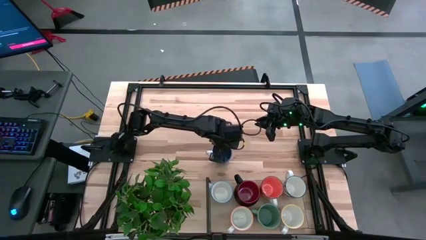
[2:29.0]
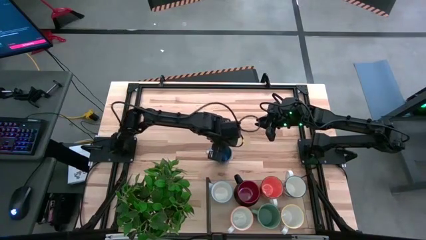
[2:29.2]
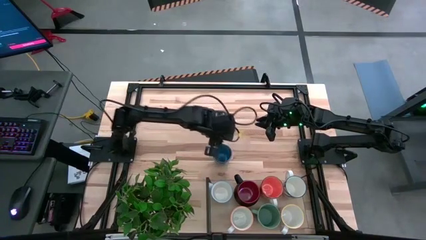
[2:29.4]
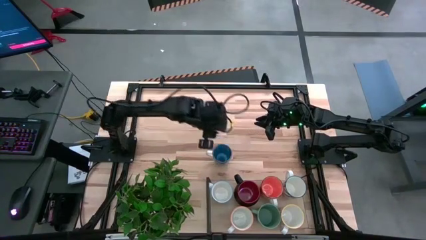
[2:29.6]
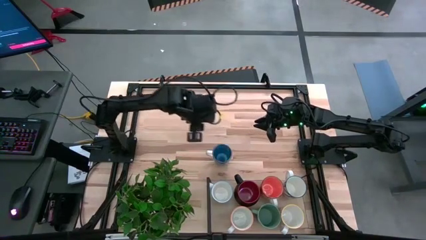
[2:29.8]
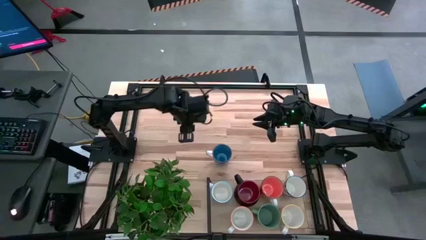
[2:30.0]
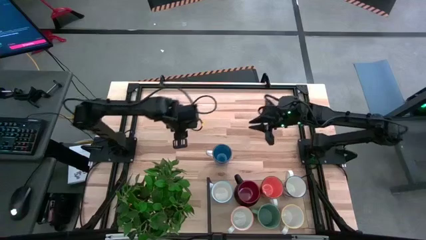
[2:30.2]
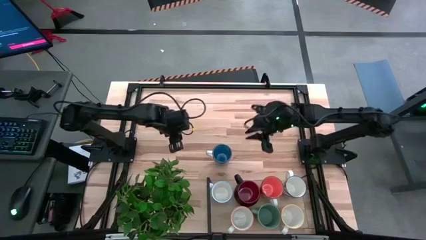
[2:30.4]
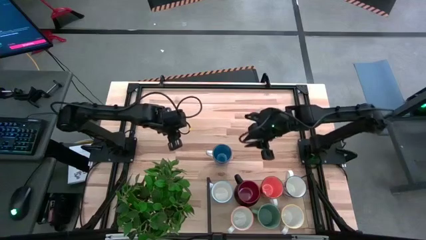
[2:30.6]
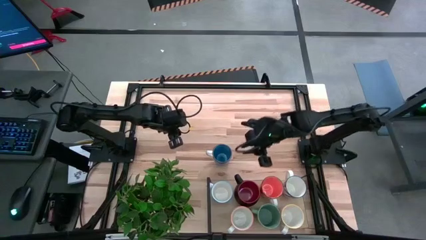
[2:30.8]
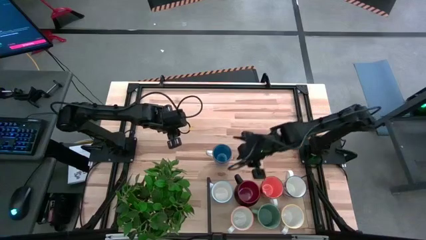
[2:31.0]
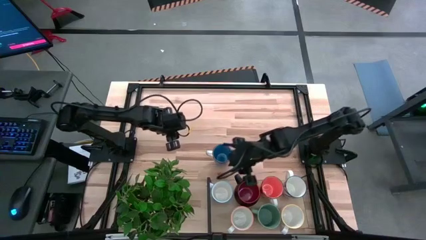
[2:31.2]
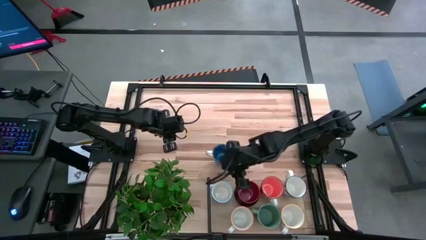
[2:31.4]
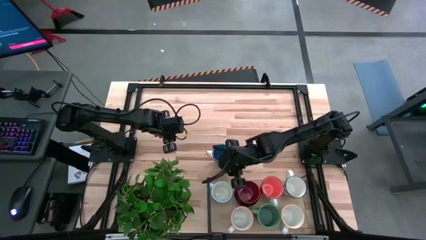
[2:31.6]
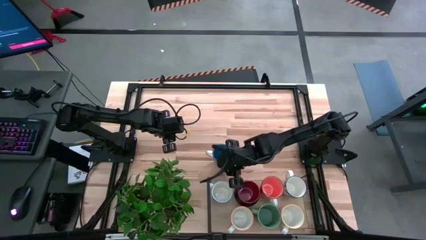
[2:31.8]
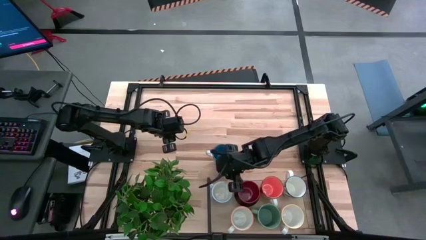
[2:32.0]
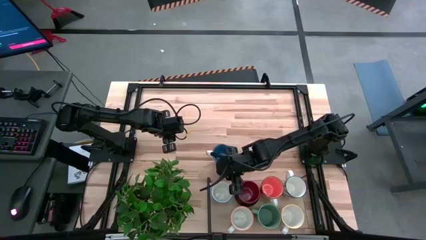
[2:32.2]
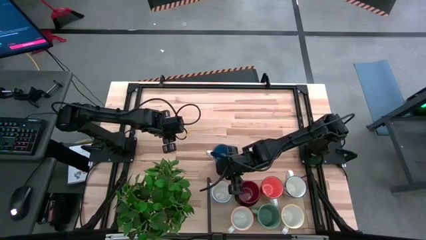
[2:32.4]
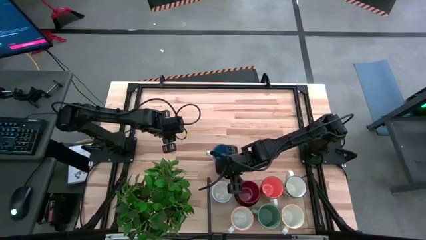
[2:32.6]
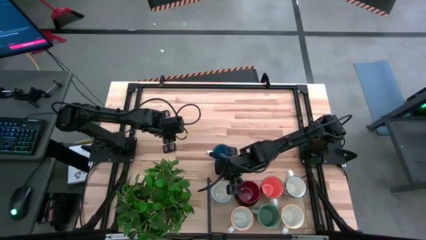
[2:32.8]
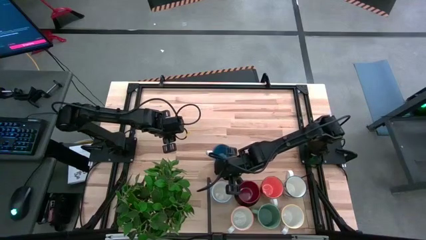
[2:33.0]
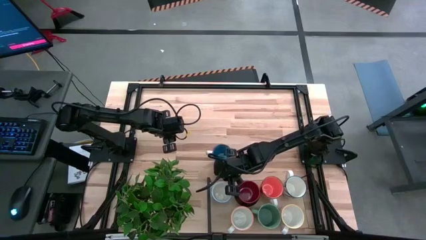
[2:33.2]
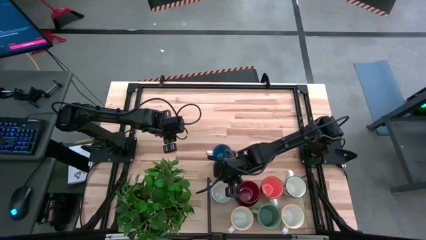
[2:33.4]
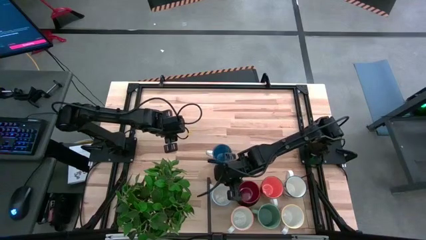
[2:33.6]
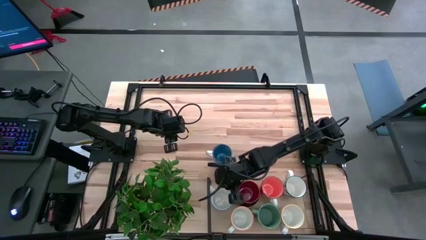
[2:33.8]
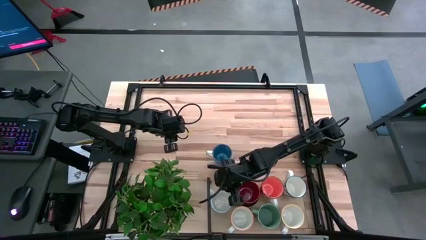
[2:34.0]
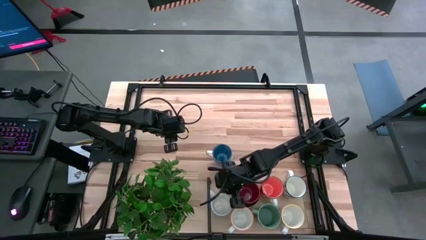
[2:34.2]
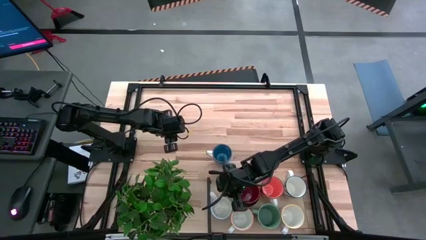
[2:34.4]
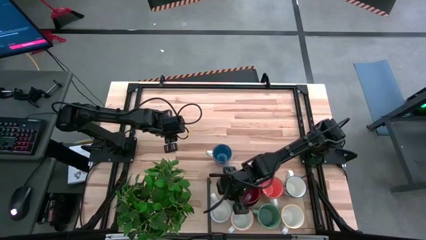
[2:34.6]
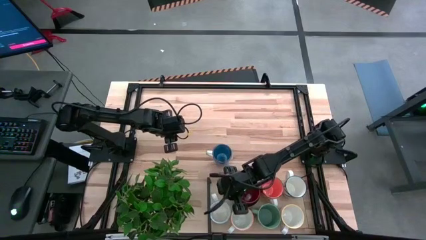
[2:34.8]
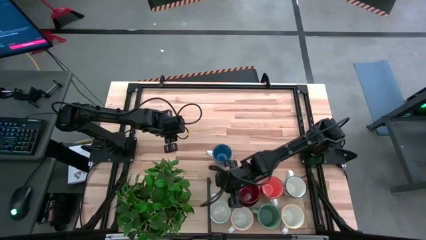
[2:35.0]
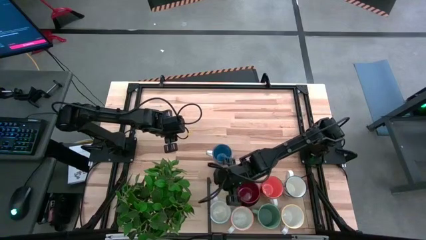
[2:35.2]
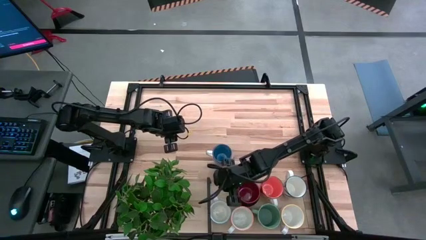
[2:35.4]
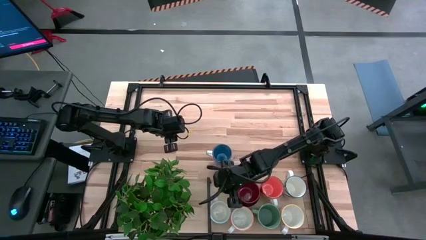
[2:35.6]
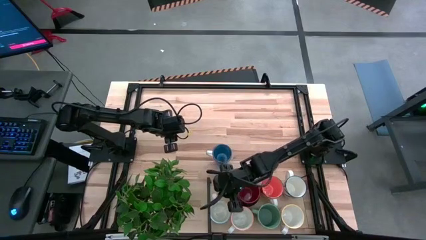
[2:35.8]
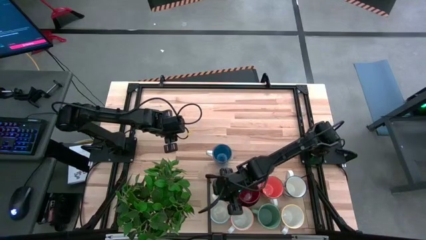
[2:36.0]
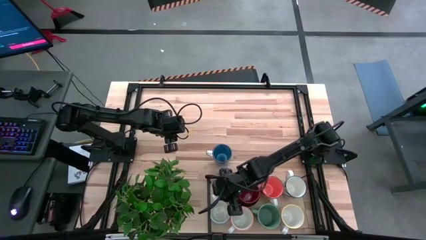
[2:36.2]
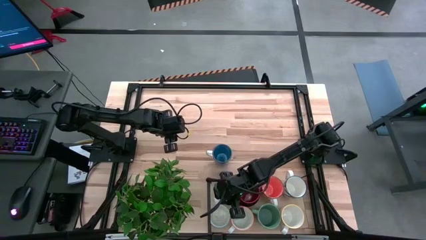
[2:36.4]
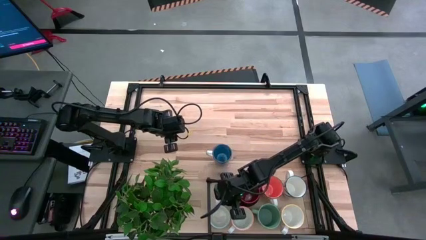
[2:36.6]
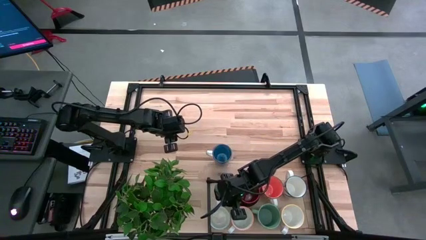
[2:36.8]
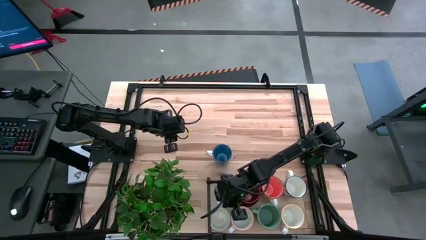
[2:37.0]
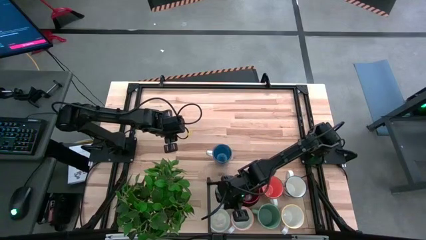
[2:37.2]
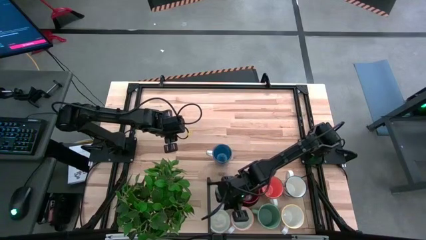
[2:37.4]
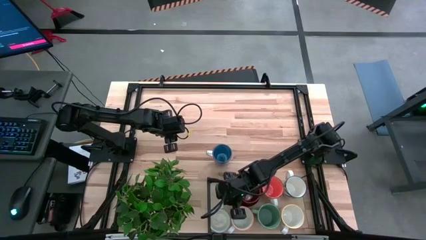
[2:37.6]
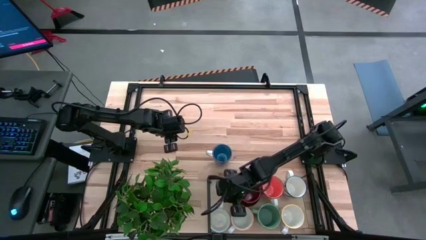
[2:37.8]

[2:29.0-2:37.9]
Task: Place coffee mugs
Adjust the red patterned mug on the shelf

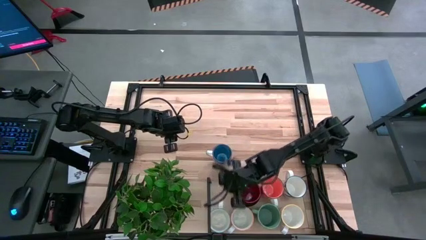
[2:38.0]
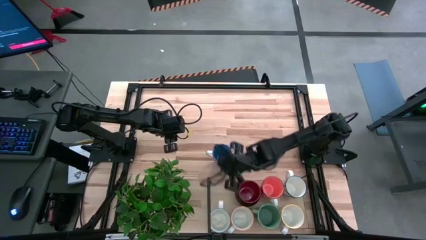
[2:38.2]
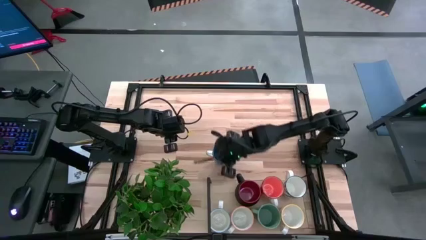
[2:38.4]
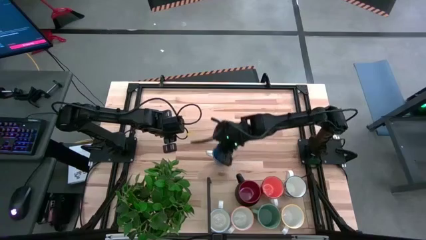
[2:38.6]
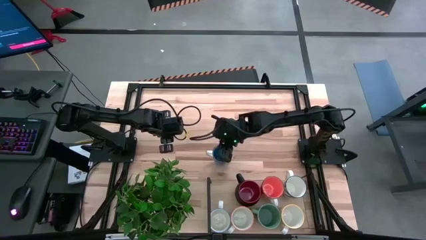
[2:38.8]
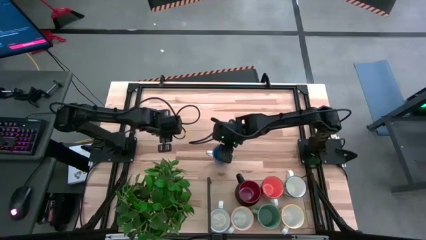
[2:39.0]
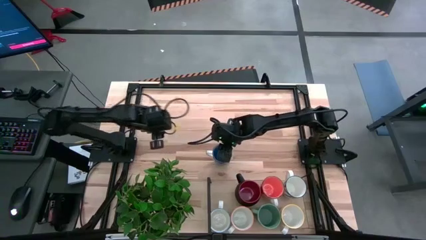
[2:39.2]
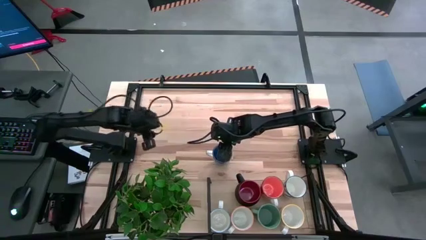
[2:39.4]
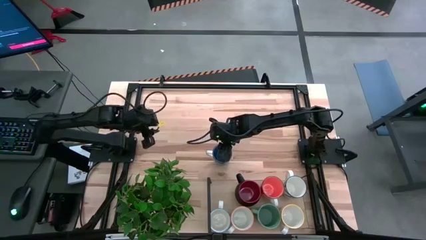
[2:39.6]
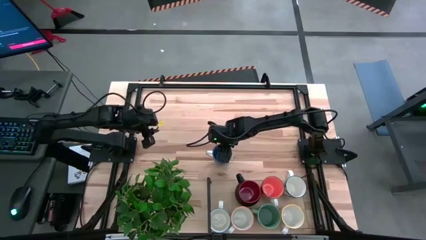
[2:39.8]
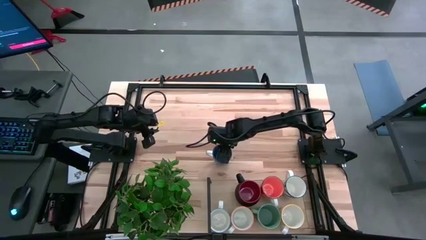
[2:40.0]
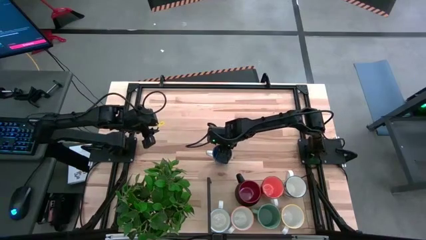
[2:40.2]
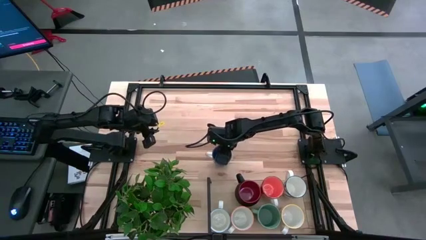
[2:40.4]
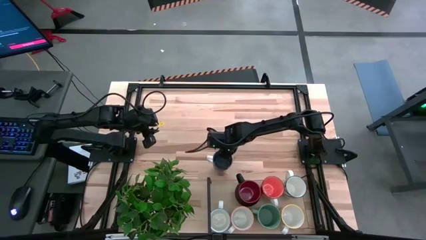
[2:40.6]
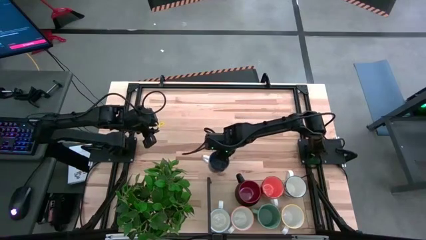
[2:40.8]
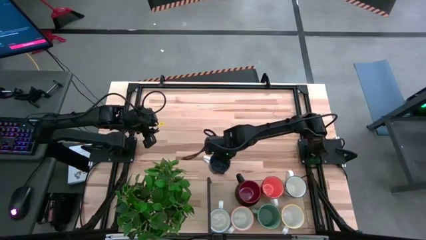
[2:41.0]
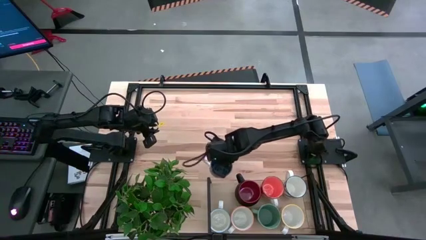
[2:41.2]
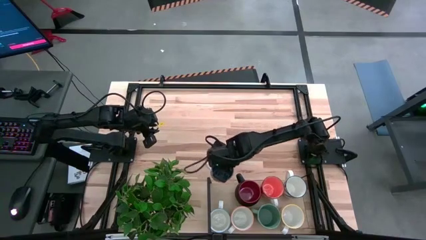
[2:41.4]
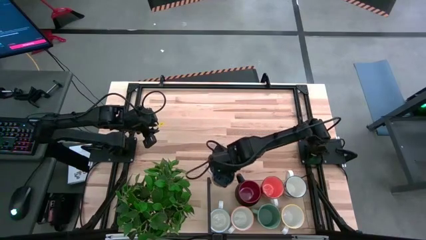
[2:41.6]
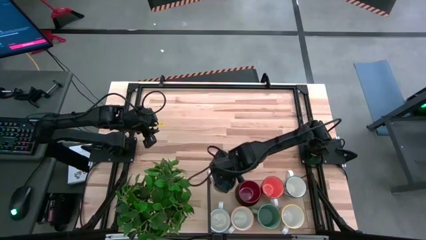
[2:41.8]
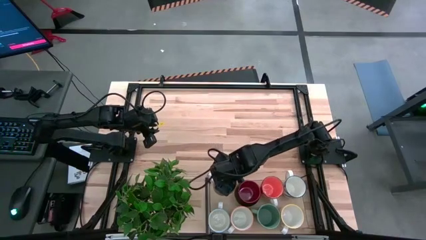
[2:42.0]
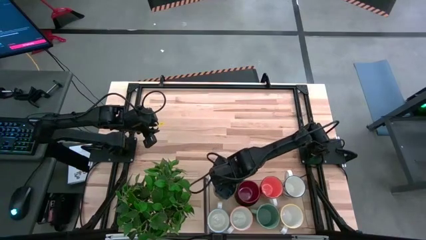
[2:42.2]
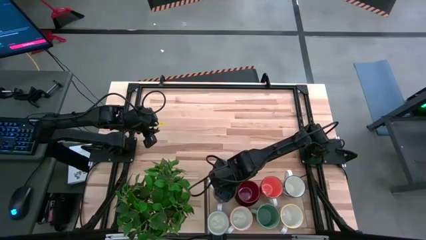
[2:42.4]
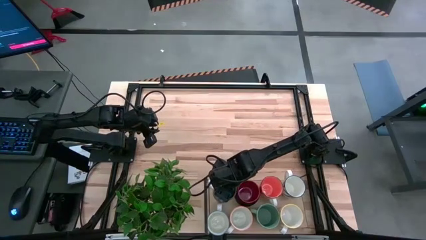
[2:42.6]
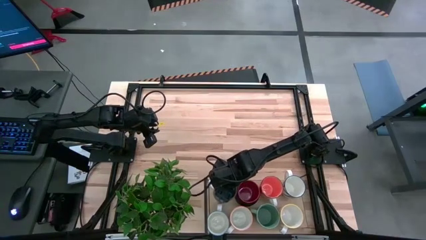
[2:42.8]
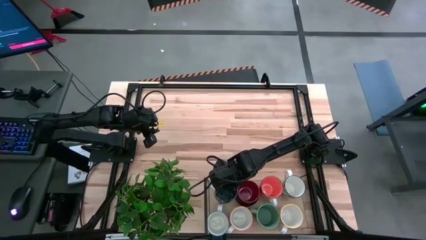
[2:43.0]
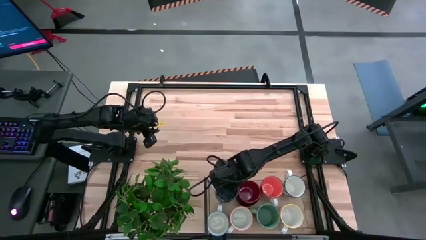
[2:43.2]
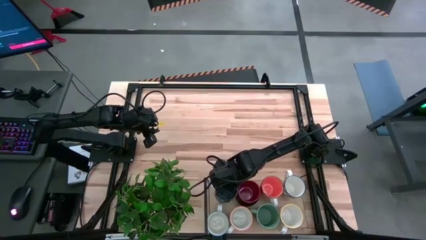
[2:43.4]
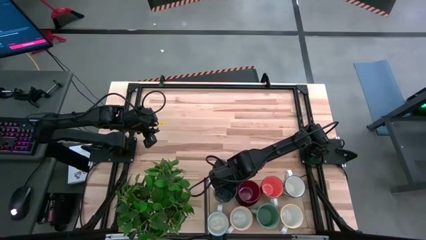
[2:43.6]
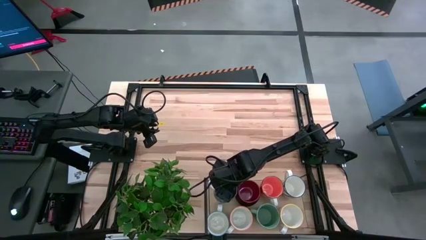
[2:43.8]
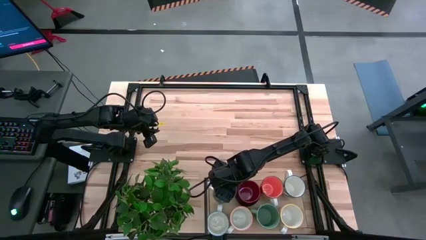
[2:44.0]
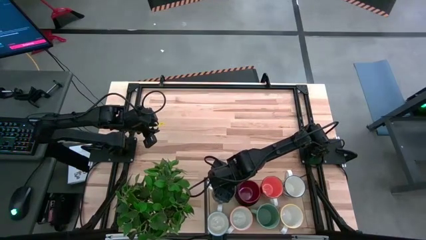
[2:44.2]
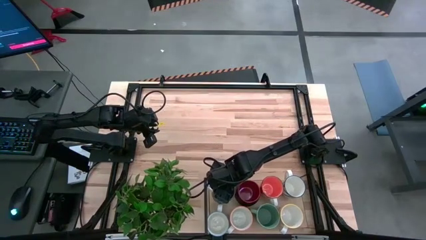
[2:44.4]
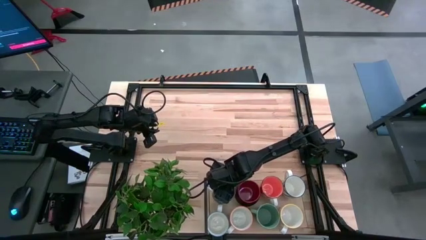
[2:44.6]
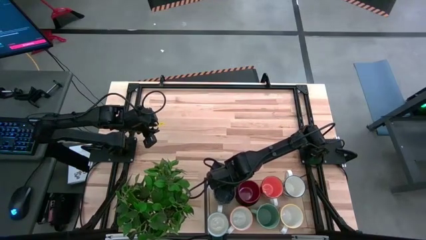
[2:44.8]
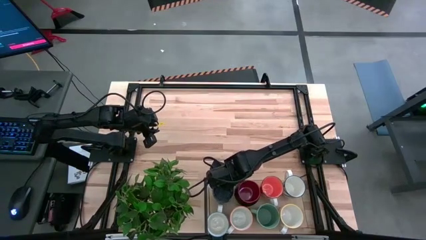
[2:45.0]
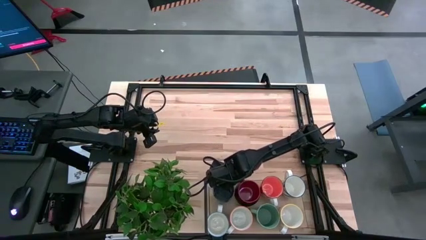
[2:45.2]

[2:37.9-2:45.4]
Put the blue mug on the shelf
